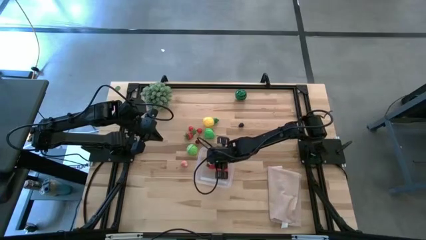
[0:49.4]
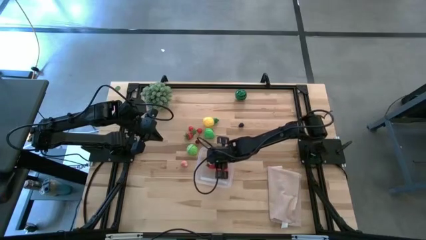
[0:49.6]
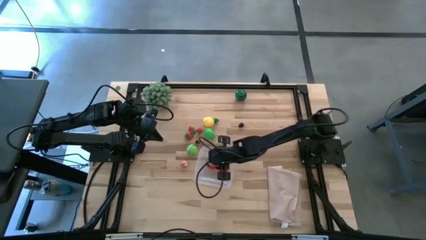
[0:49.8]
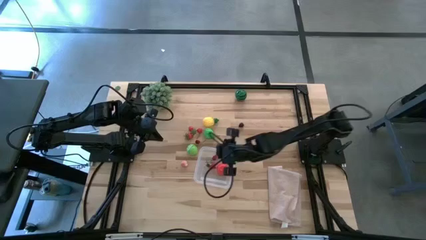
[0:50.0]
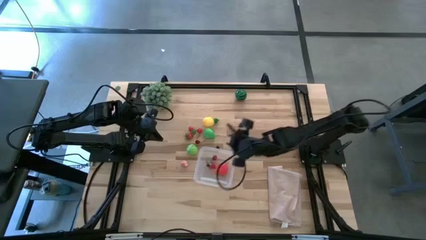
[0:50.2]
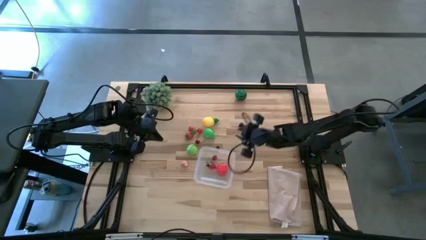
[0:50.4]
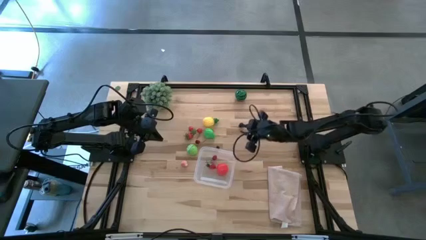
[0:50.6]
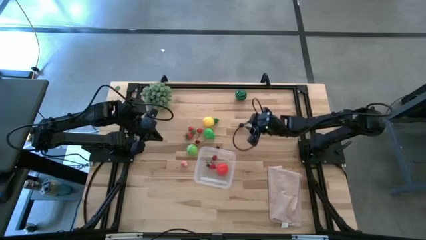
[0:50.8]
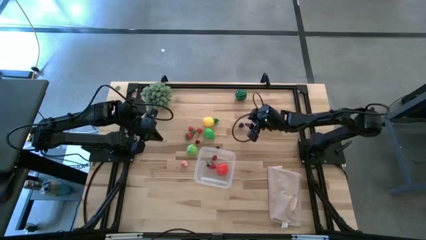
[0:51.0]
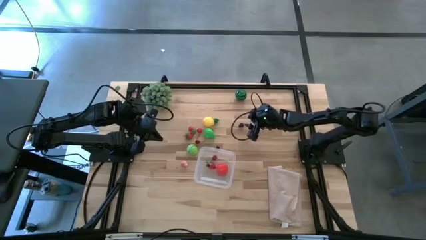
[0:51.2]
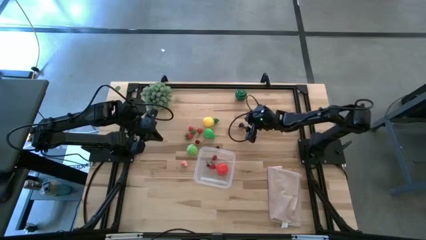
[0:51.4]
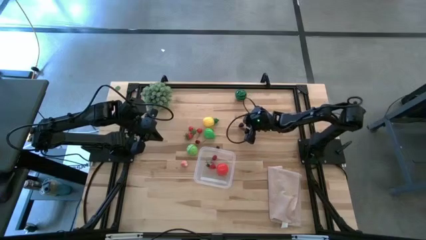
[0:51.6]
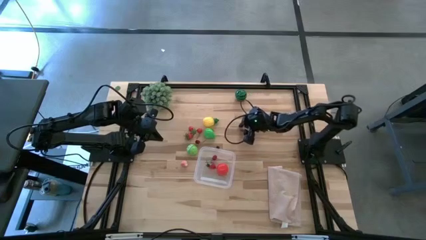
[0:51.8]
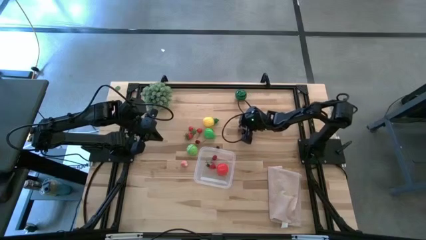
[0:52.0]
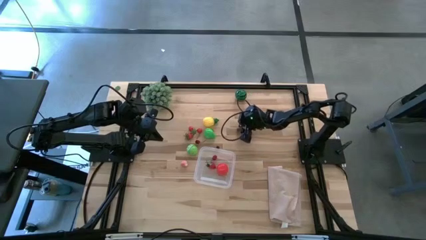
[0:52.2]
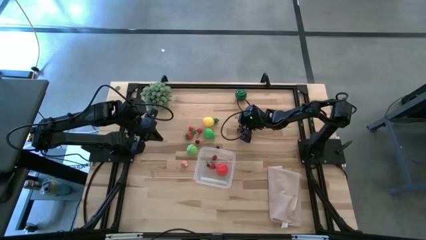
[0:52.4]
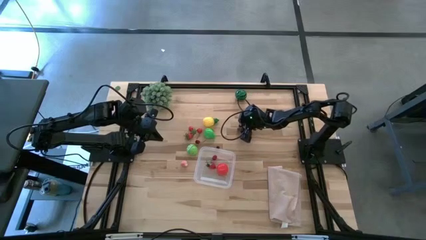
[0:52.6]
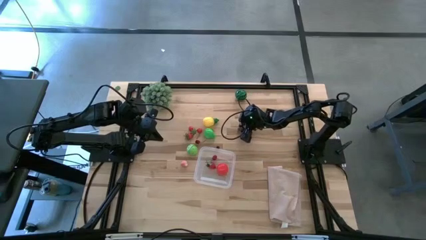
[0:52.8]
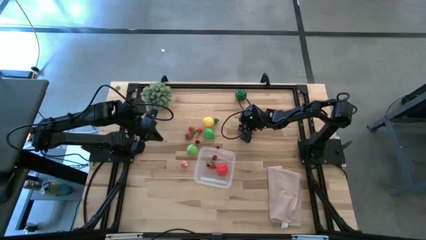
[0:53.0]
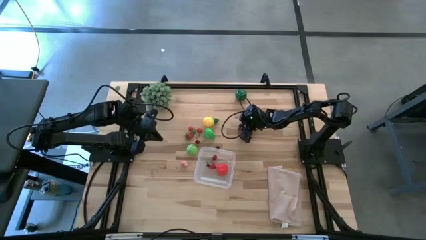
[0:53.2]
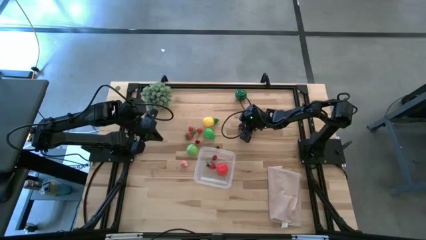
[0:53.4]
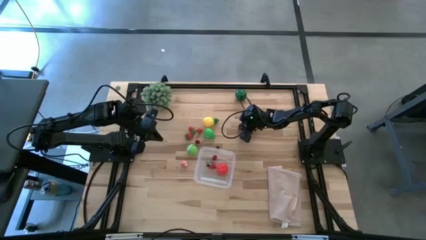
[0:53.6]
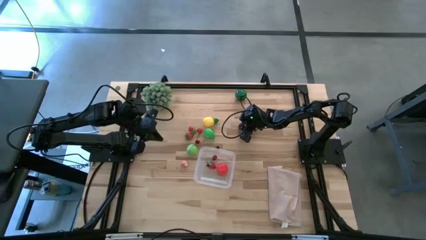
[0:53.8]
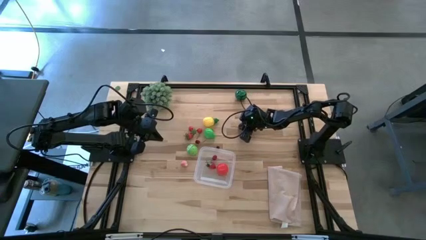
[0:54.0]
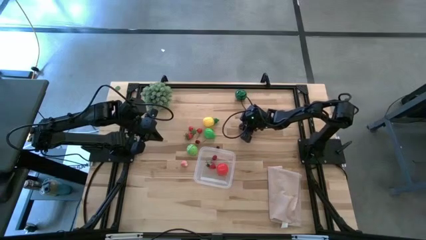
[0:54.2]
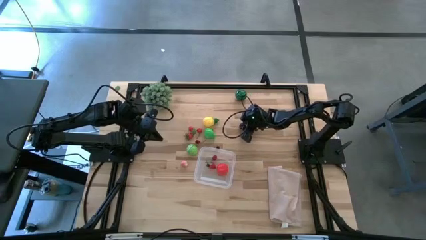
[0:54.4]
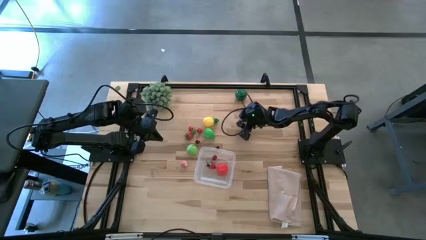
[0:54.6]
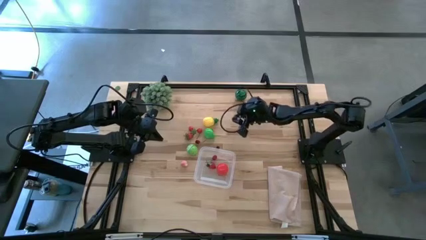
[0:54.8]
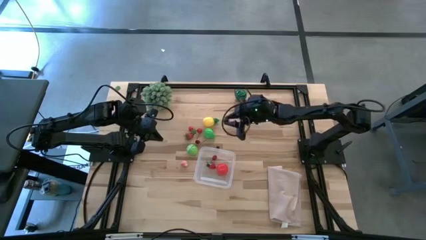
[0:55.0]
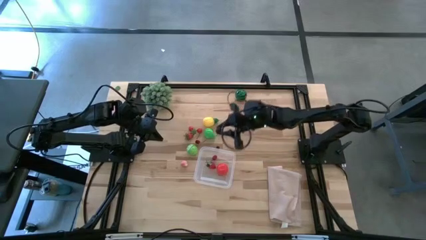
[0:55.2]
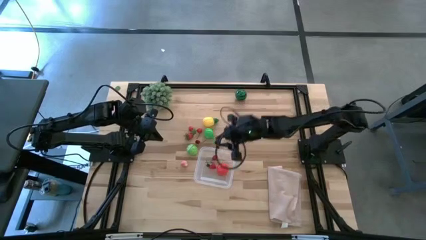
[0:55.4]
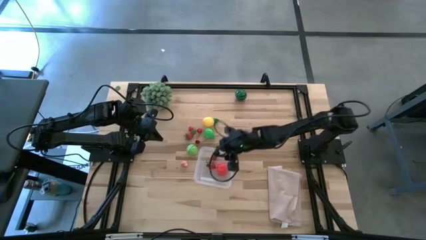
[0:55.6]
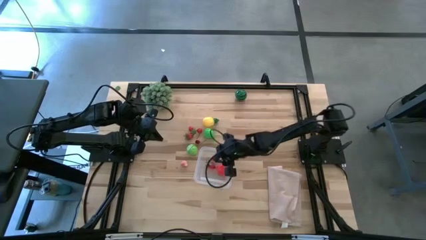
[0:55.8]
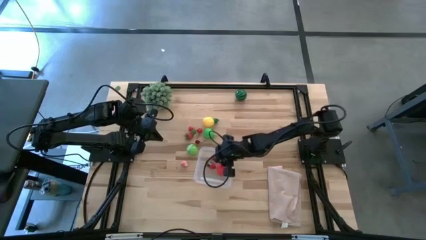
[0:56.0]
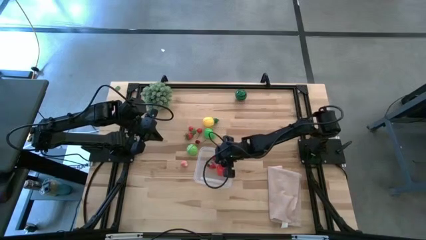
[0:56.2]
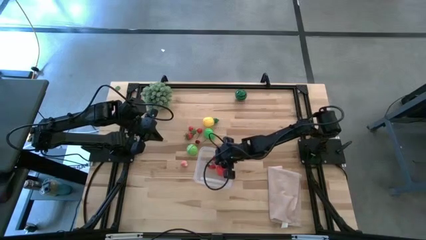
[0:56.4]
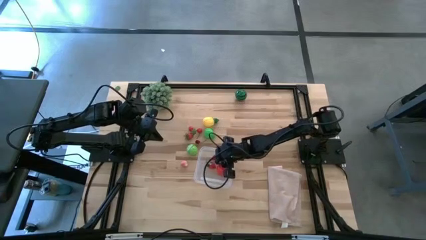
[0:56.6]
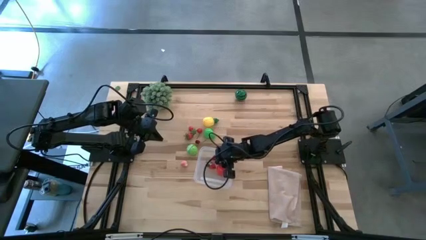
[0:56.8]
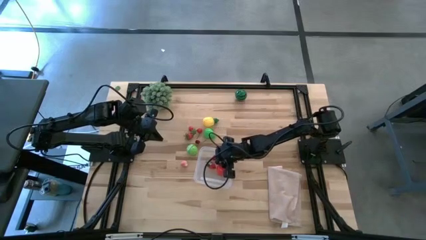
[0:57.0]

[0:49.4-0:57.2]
Task: Pick and placing Produce into tupperware
Put the black berry into the transparent bin

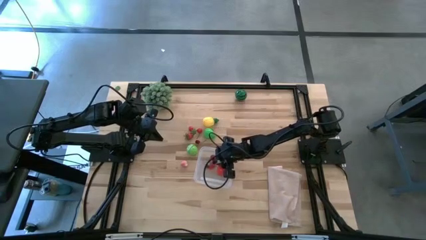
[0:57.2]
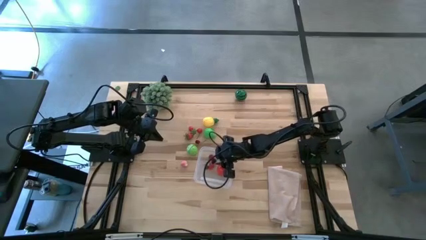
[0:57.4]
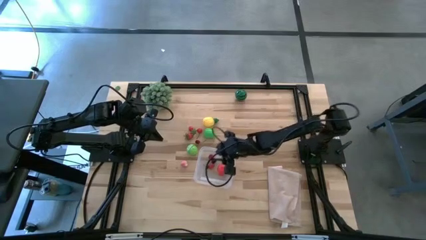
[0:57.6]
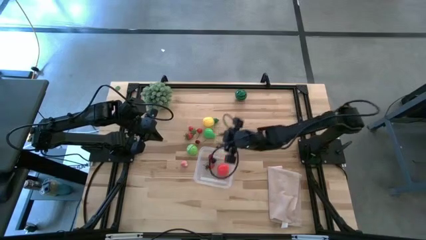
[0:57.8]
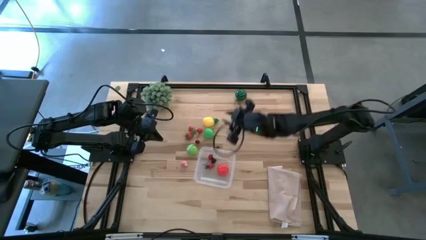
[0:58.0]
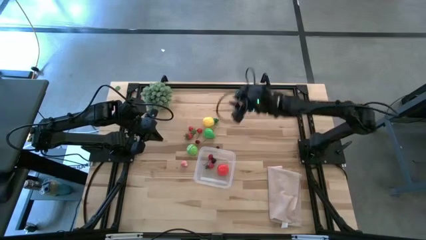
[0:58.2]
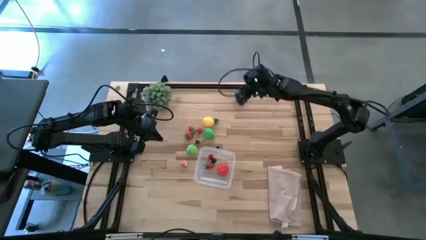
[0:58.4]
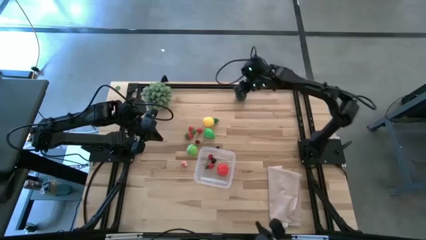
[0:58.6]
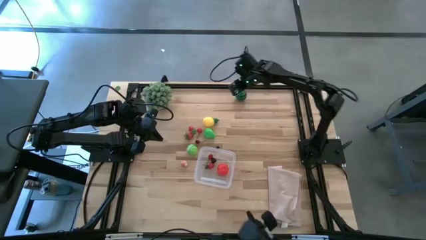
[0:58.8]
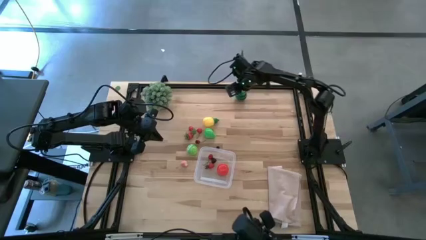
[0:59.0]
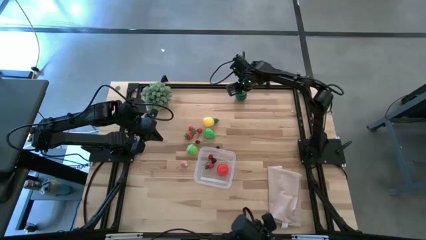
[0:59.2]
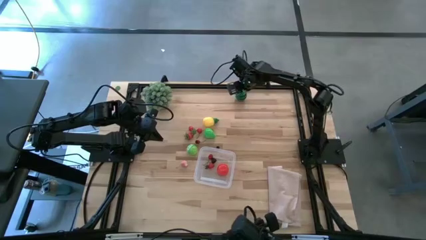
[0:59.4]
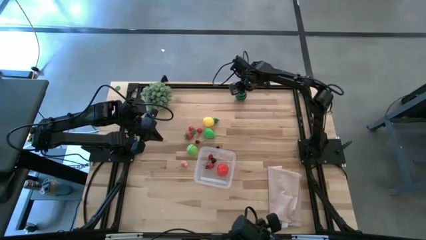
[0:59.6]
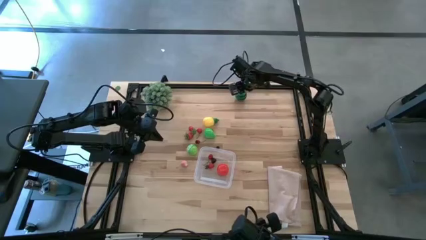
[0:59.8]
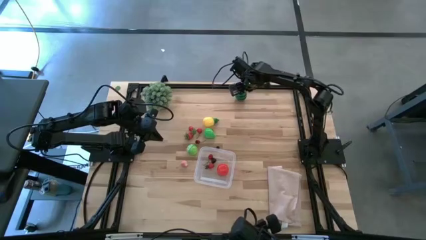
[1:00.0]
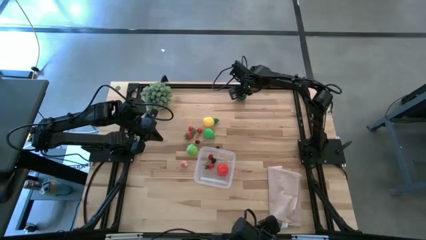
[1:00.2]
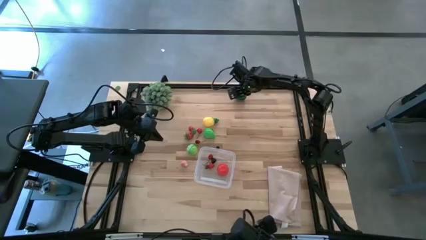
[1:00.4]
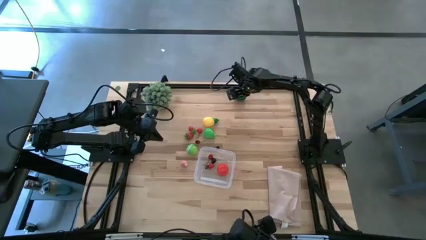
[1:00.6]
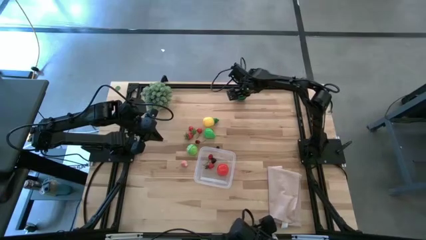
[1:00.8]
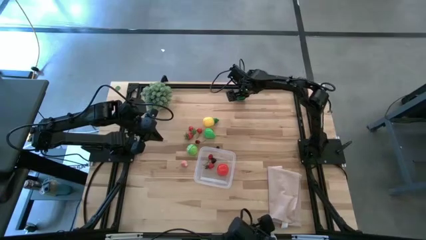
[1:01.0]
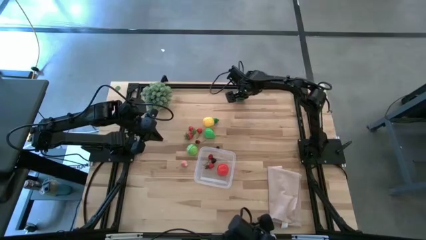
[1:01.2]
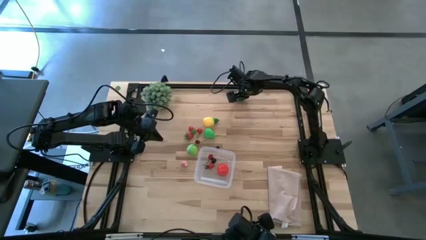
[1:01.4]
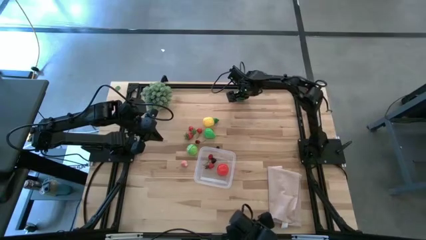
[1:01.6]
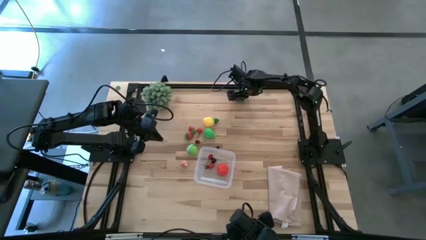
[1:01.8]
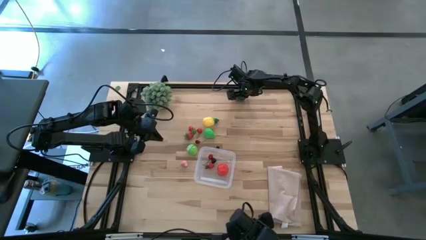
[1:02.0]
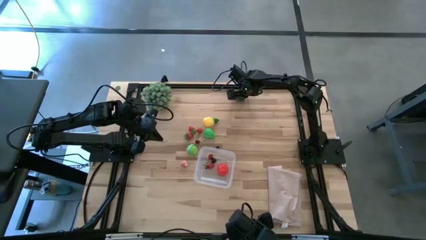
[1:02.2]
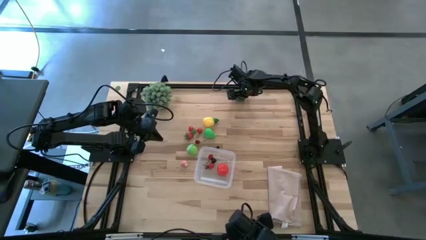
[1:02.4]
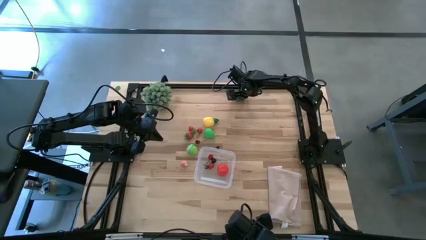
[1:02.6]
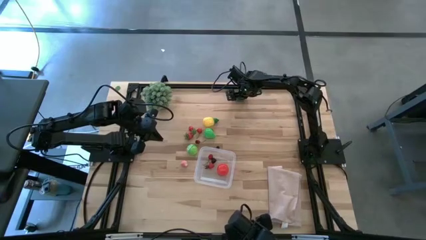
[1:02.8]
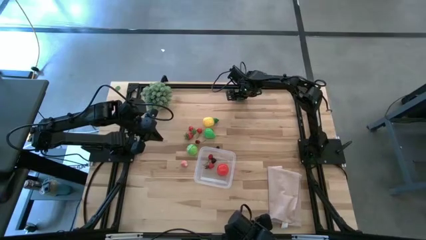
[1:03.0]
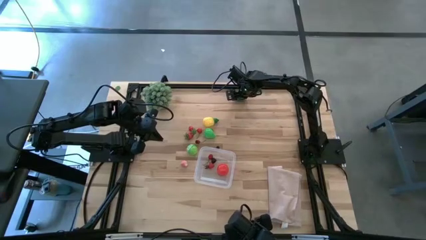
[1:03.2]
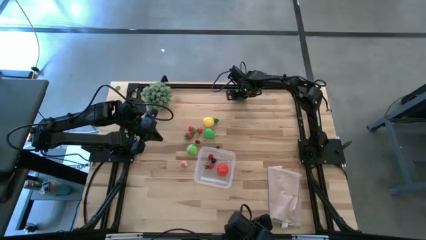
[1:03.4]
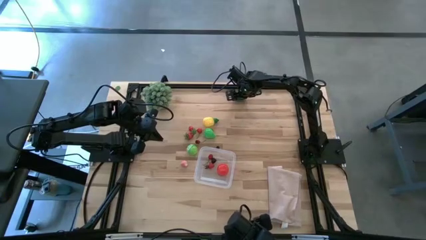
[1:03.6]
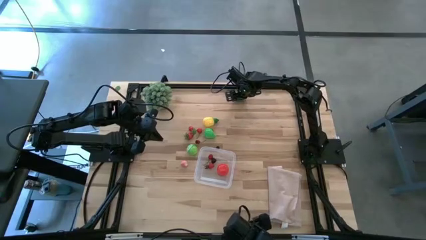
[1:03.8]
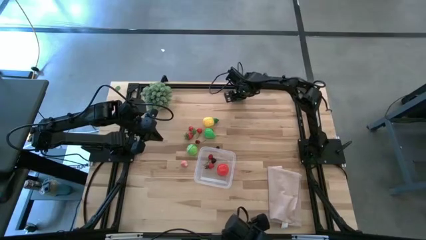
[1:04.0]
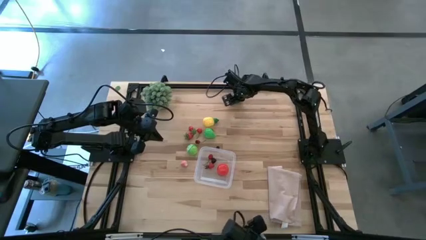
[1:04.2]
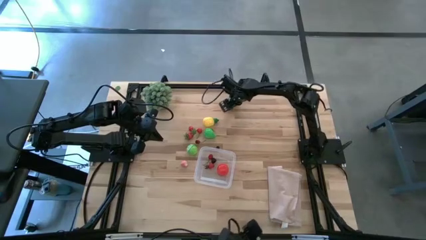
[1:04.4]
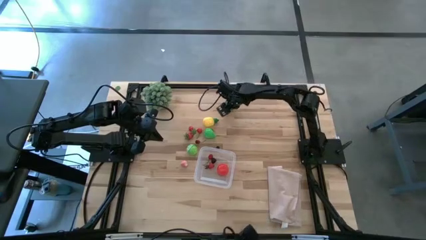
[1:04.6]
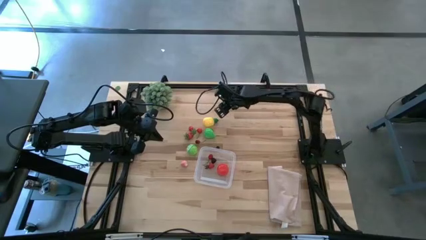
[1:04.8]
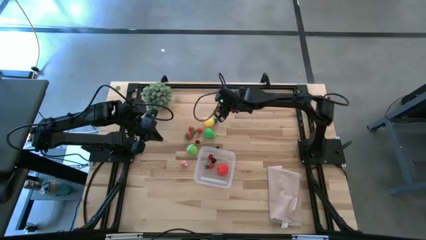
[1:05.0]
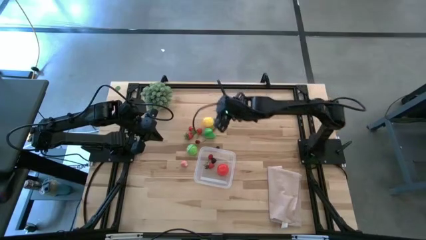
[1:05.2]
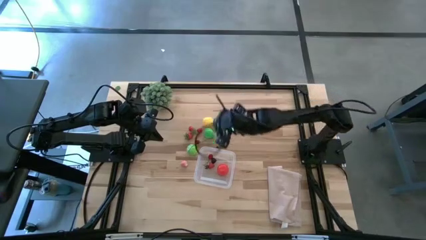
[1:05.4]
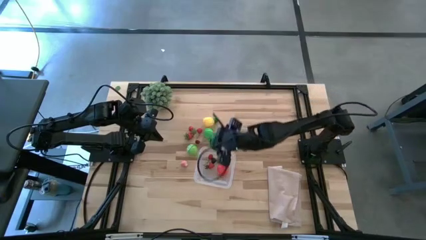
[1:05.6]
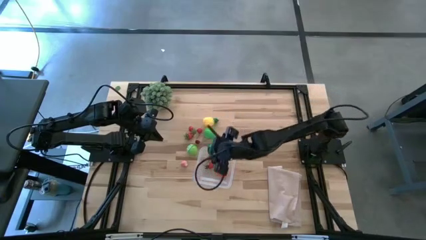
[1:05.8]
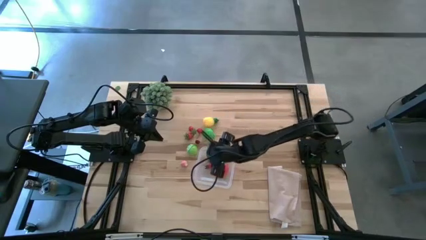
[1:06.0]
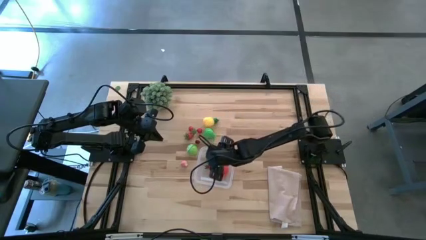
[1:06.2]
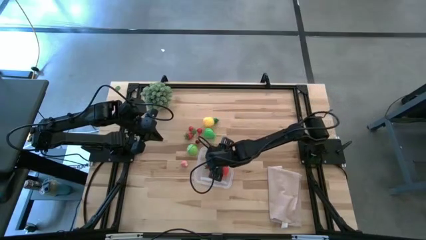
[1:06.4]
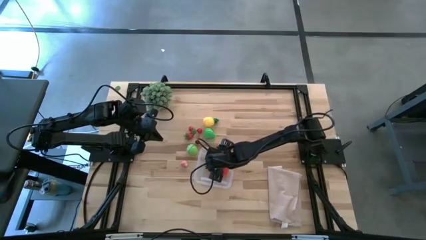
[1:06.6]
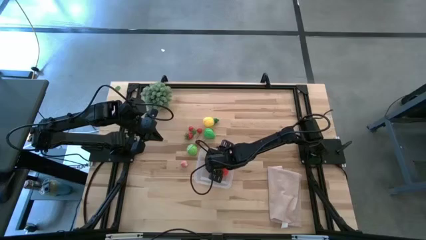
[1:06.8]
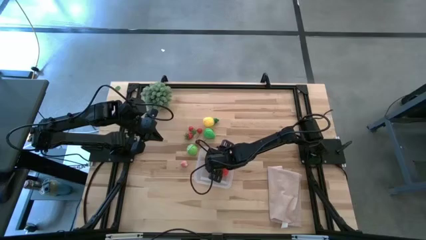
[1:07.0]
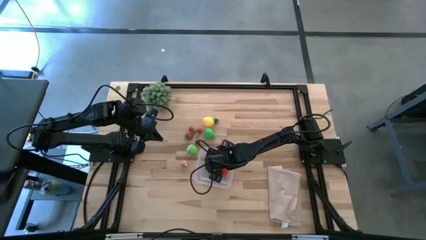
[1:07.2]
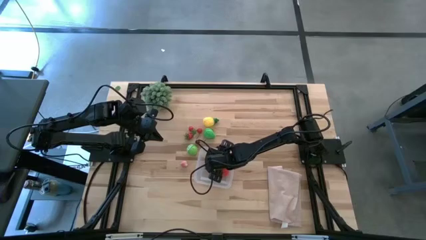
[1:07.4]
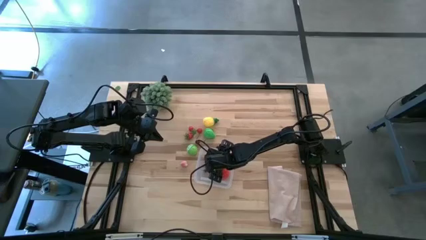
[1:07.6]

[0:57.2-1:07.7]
Put the green watermelon into the transparent bin
